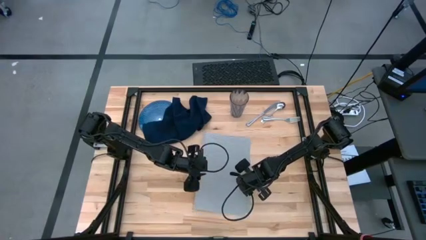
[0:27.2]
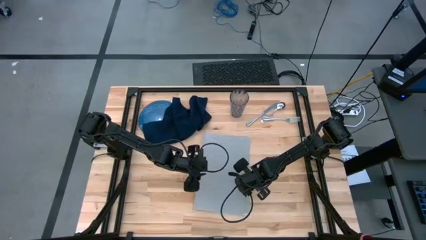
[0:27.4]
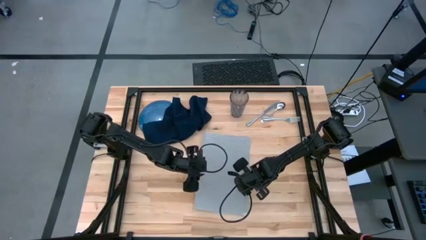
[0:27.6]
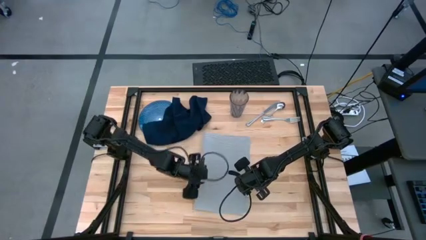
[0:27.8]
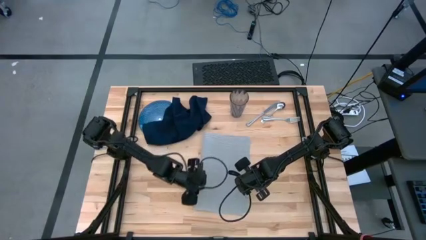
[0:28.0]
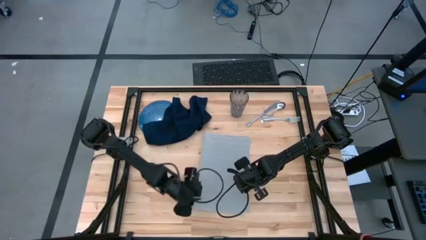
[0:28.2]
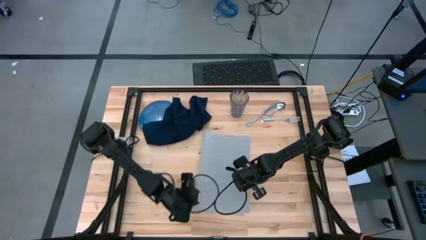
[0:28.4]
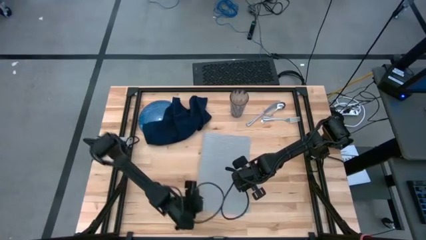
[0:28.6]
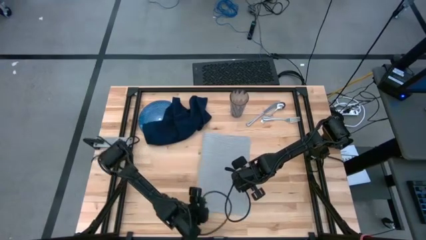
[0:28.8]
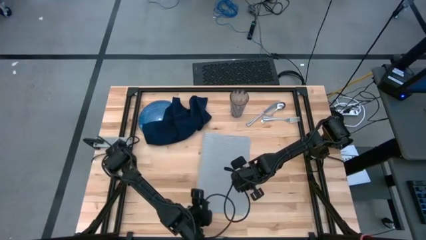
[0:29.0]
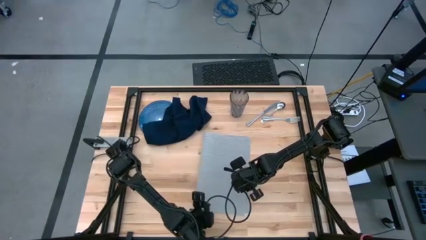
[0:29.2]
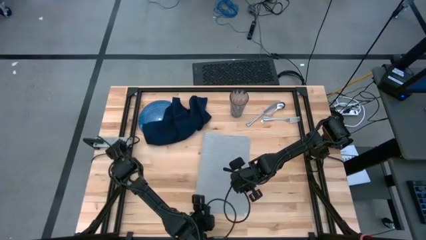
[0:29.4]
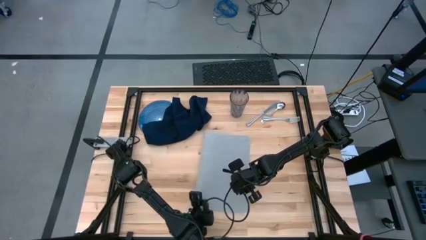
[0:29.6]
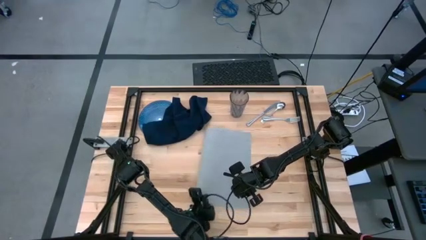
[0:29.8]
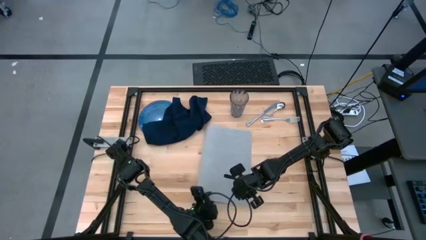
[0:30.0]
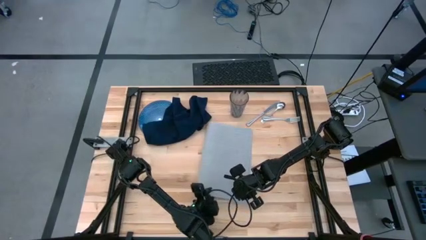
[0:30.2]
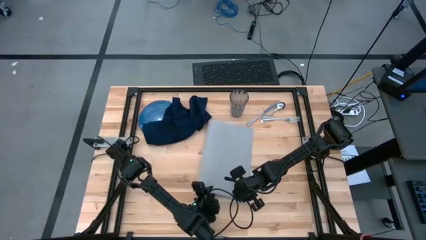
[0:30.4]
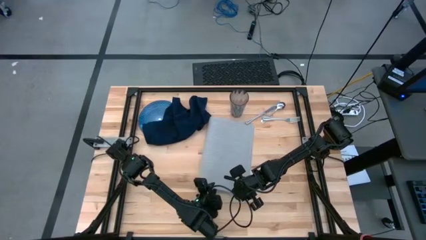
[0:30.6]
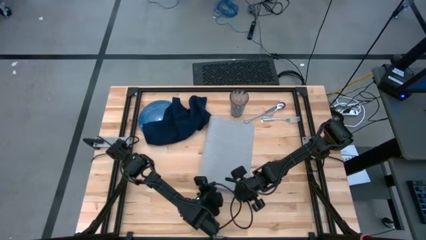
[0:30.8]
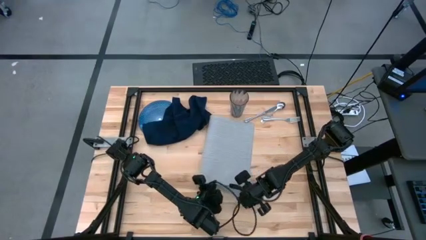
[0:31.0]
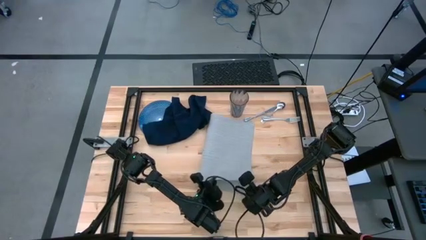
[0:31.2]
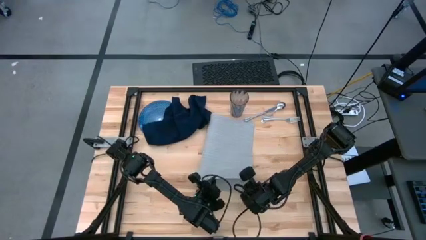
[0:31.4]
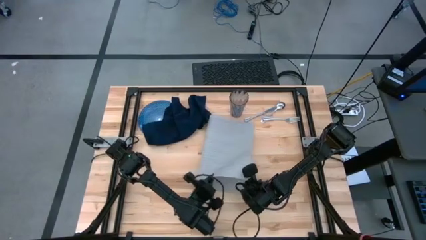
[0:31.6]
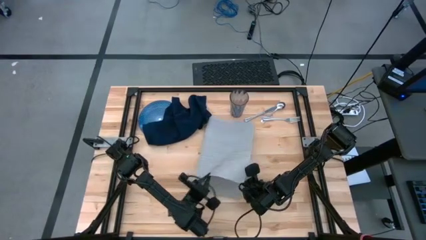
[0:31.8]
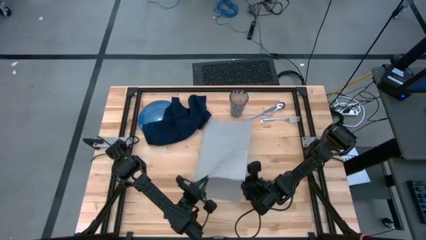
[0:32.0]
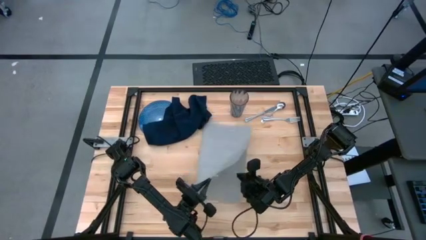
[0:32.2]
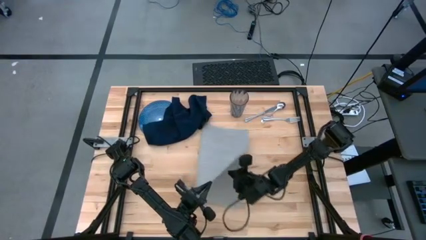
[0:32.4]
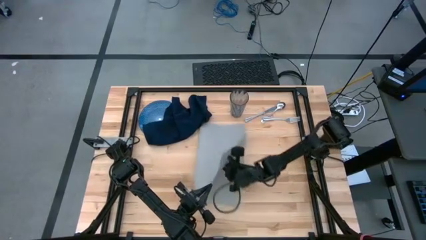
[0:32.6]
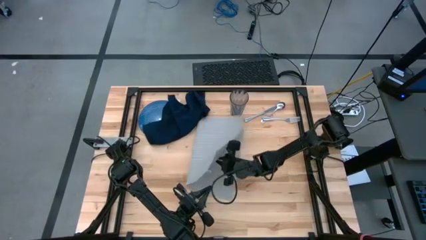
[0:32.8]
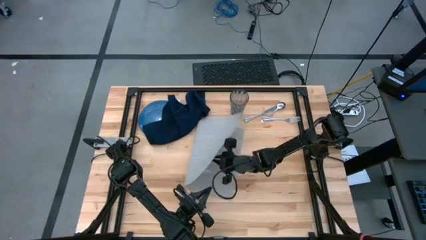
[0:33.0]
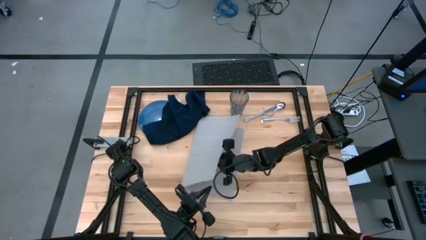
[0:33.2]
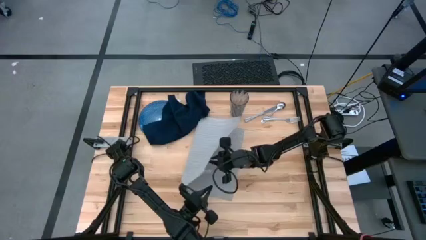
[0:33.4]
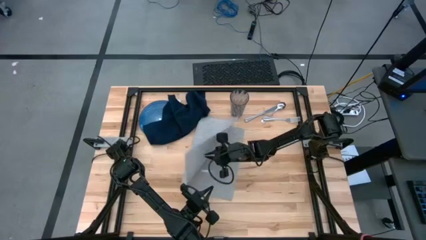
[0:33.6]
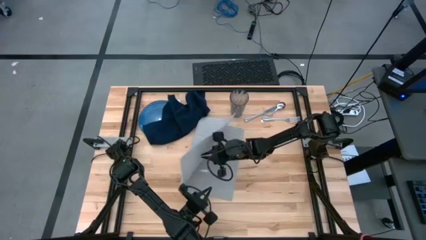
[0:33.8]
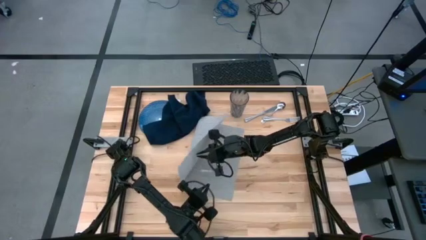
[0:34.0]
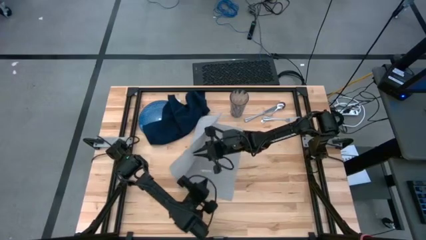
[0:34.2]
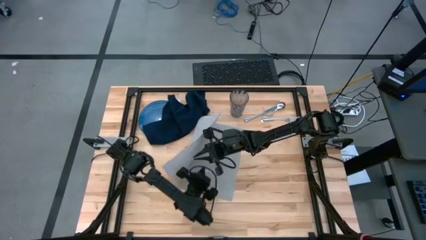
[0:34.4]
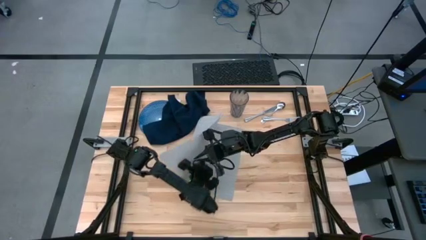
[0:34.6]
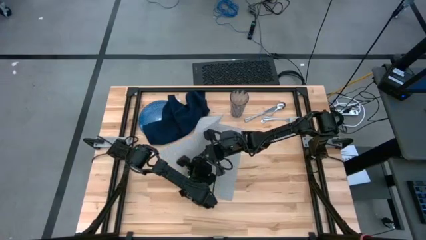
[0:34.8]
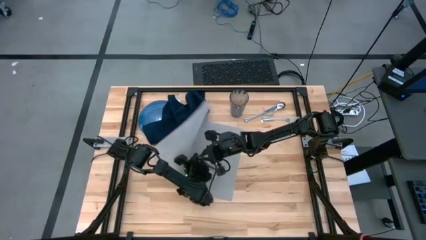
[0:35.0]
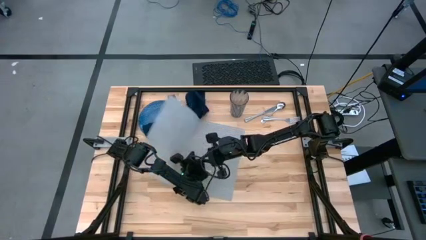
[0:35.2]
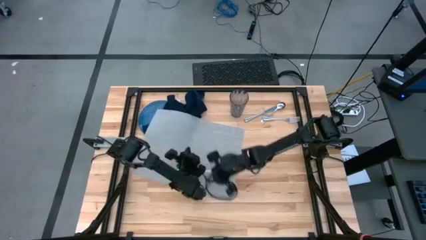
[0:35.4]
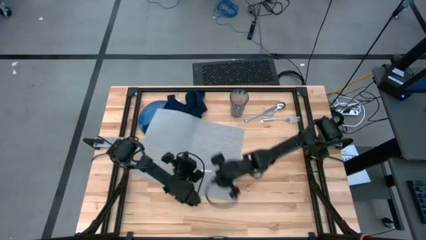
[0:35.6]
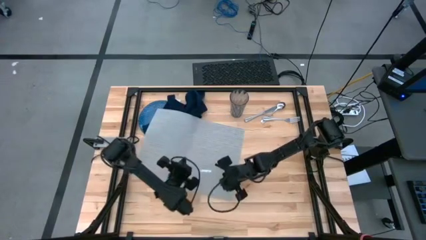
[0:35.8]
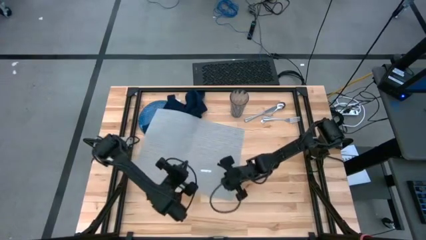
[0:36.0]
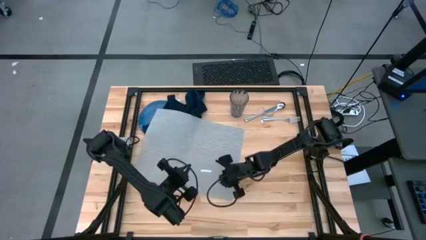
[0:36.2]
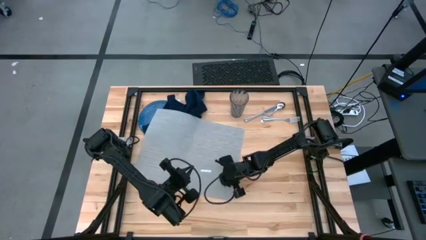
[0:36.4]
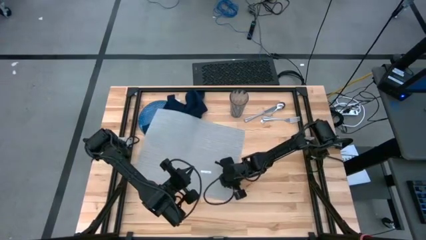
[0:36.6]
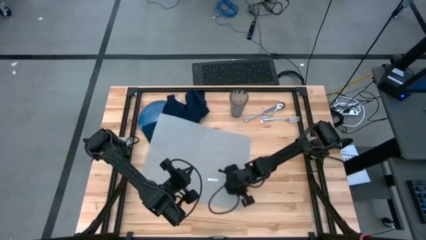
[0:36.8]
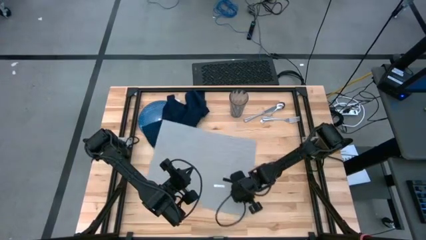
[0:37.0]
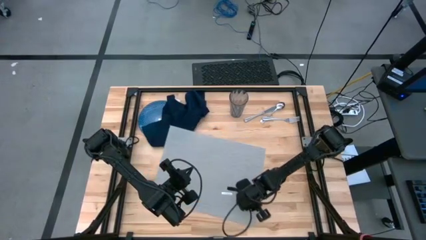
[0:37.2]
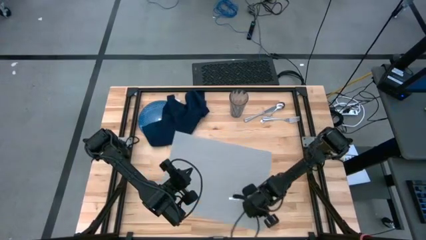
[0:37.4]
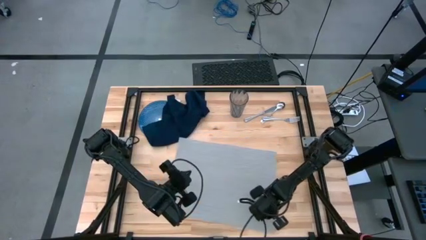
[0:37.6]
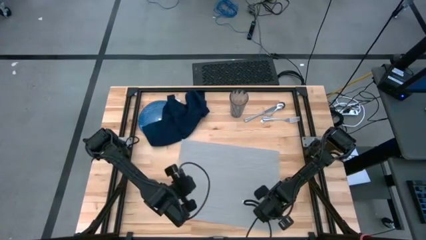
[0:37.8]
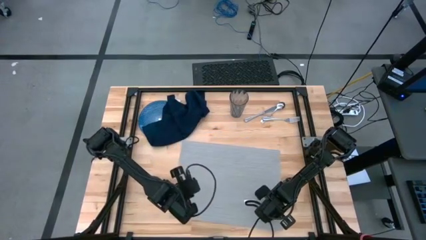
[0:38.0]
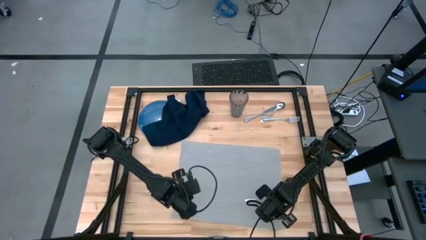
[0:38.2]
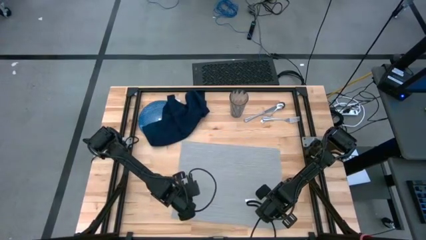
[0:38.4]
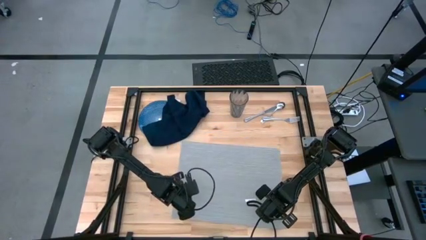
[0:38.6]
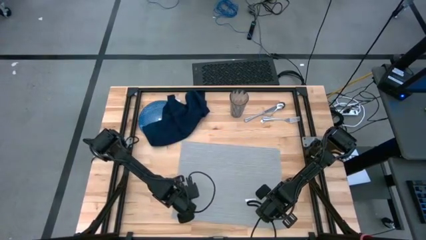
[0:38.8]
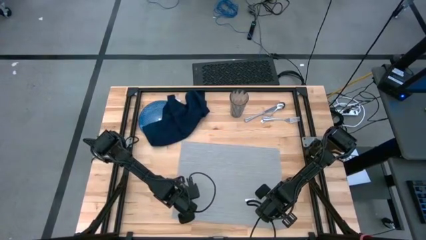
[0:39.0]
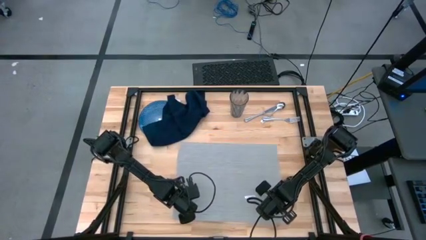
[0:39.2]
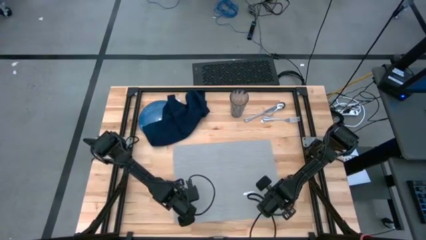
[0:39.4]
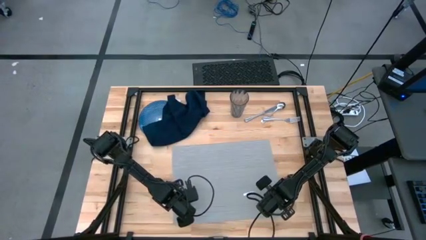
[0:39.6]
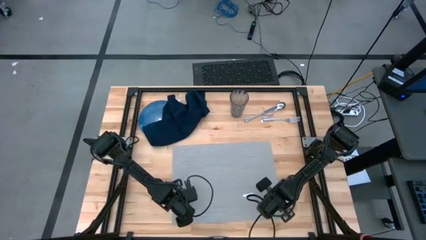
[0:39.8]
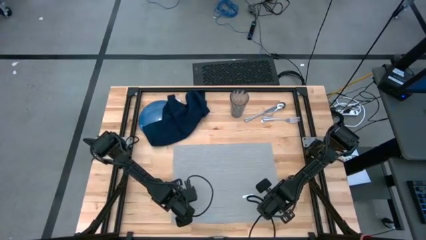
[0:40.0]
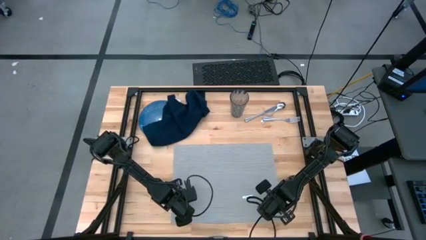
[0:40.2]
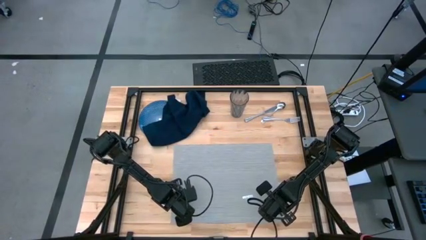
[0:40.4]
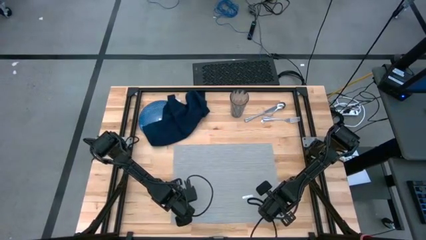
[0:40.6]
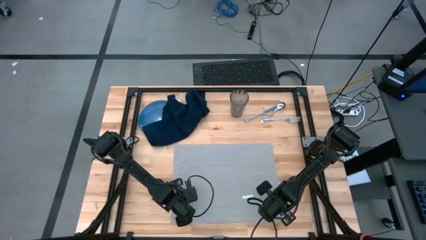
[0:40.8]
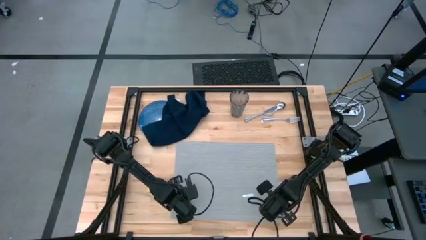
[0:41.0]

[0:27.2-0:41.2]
Task: Set table place
Prepare the gray placemat

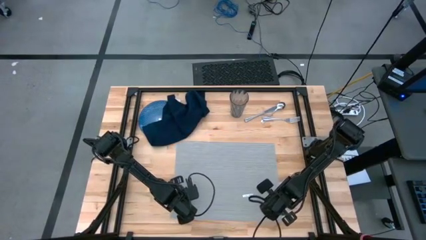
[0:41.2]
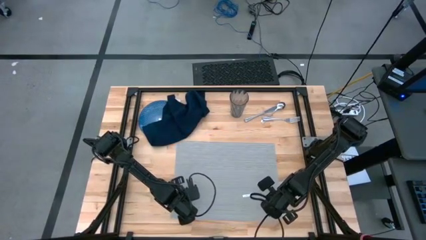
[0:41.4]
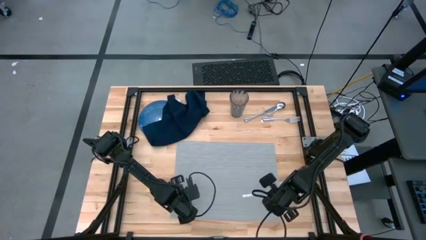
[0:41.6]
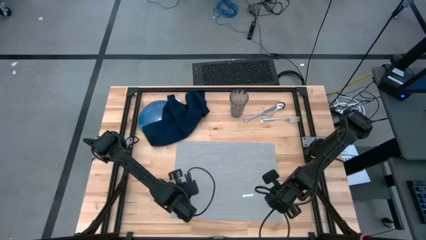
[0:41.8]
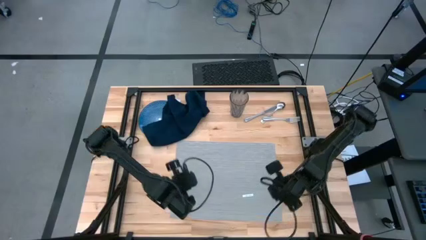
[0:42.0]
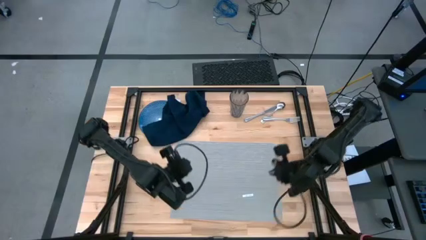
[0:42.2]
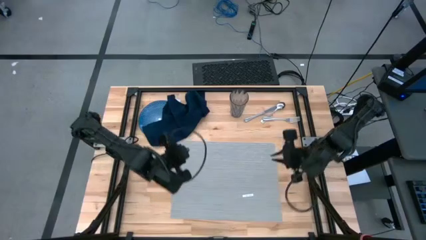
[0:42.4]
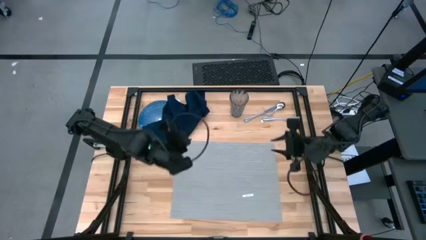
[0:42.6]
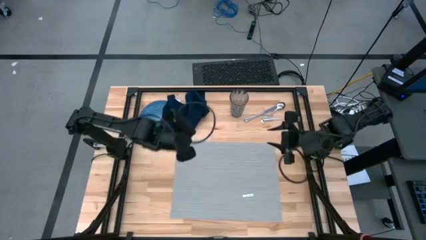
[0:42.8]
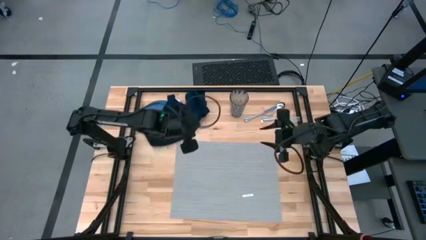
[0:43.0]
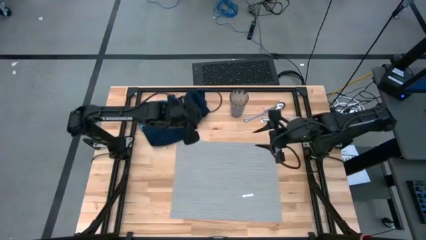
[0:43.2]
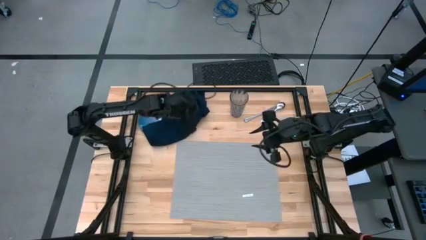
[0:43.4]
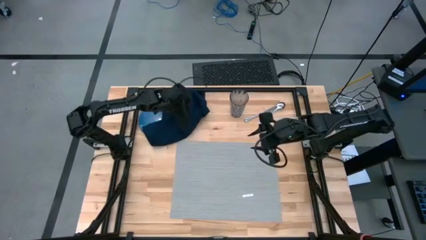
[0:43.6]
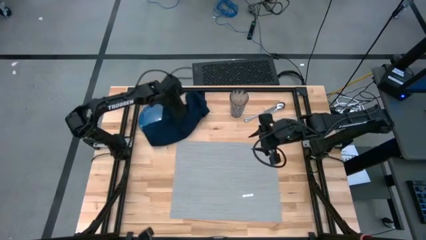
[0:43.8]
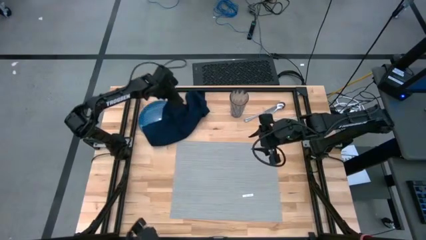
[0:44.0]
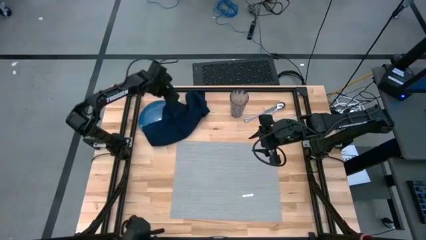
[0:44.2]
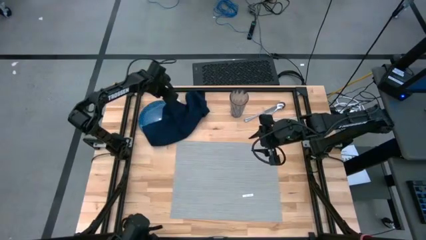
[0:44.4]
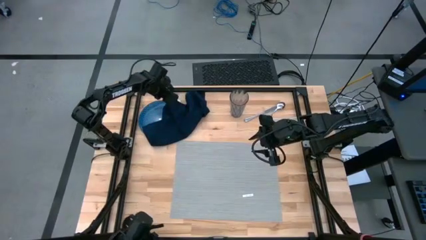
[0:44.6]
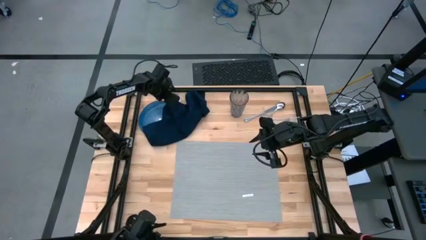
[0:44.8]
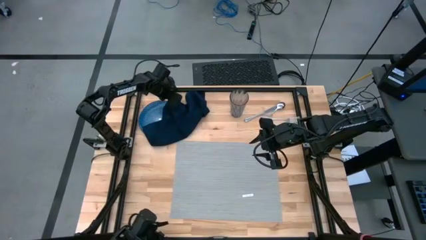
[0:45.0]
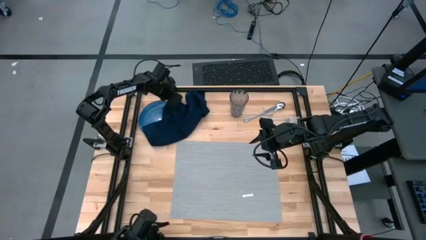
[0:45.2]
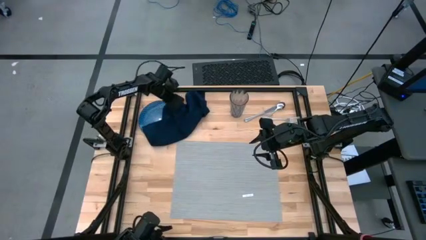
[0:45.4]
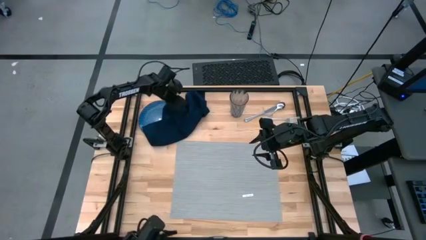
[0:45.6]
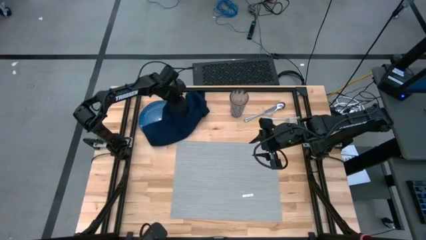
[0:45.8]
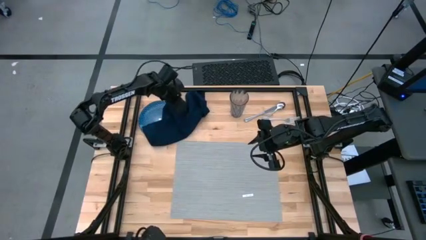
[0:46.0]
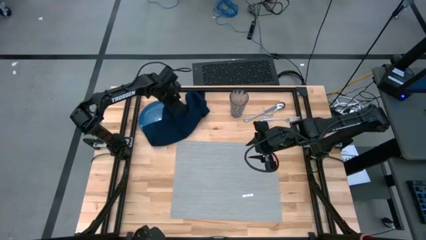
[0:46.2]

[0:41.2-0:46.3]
Fold the blue napkin
